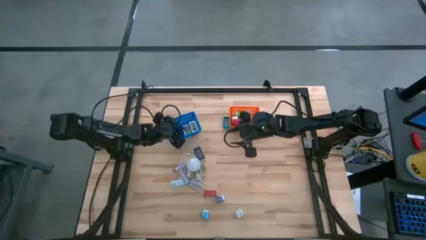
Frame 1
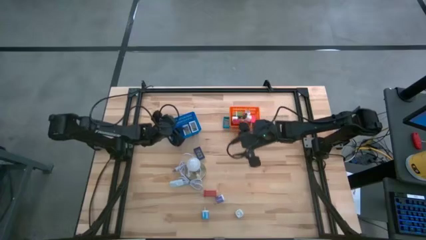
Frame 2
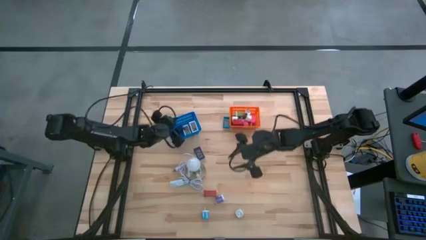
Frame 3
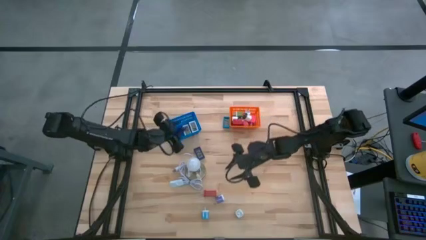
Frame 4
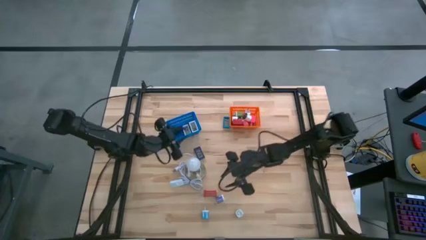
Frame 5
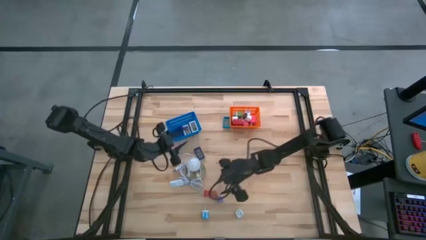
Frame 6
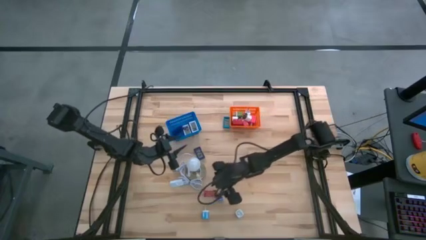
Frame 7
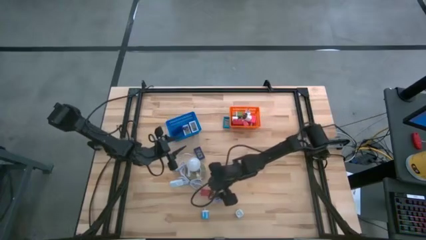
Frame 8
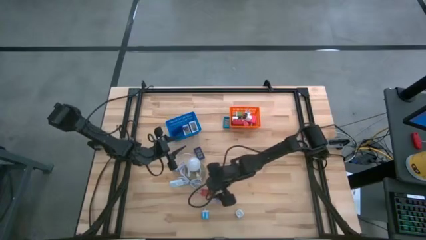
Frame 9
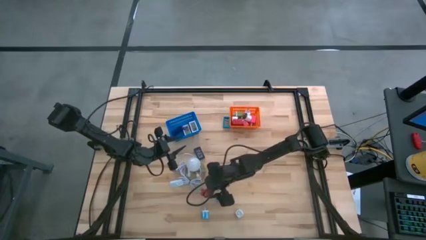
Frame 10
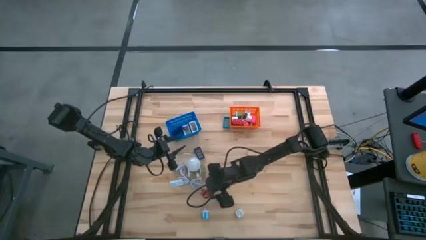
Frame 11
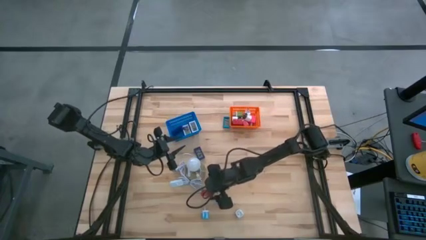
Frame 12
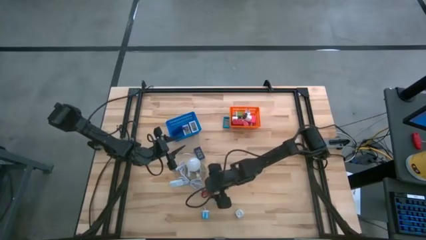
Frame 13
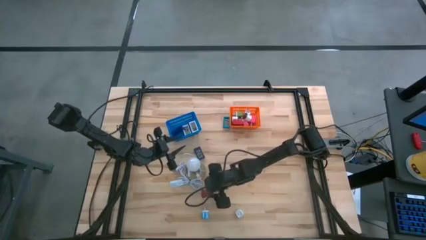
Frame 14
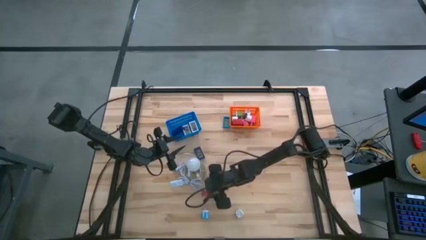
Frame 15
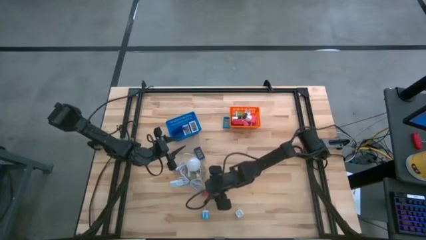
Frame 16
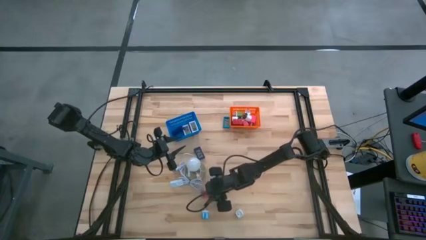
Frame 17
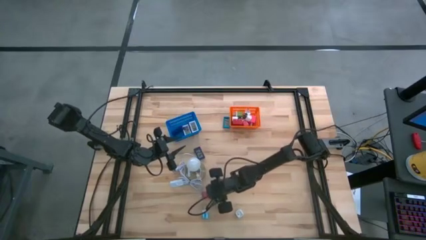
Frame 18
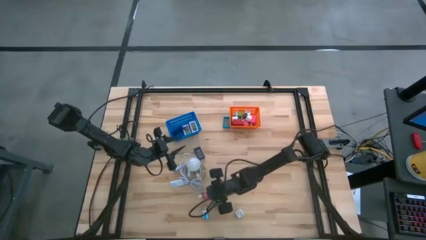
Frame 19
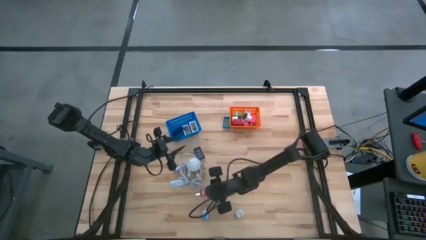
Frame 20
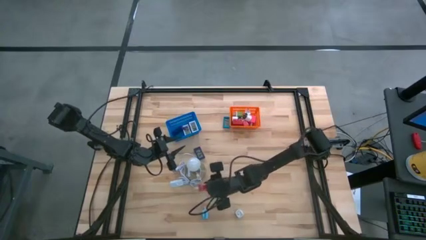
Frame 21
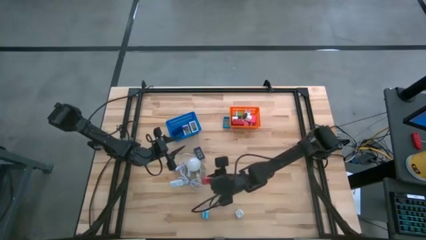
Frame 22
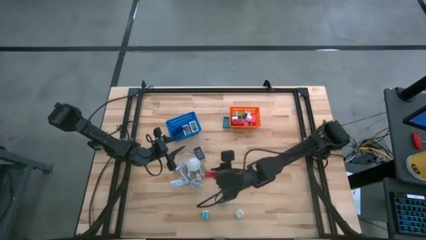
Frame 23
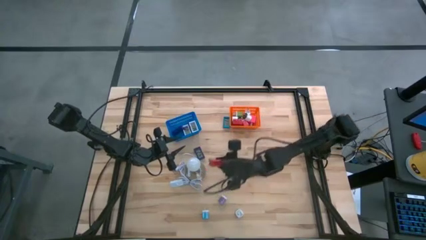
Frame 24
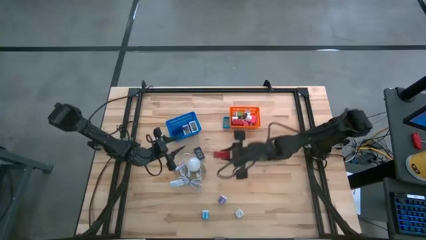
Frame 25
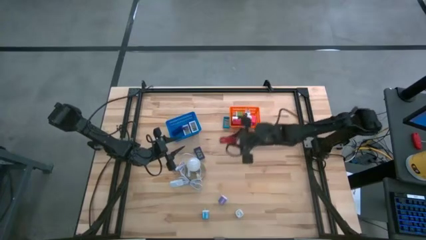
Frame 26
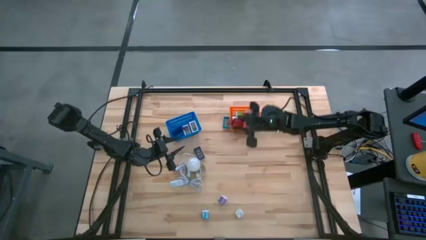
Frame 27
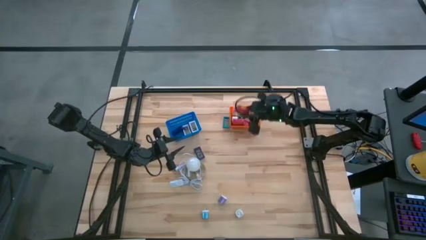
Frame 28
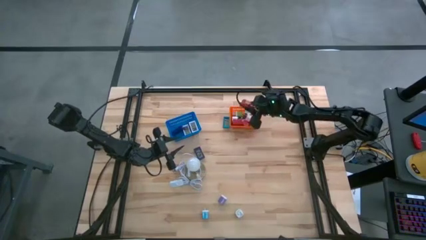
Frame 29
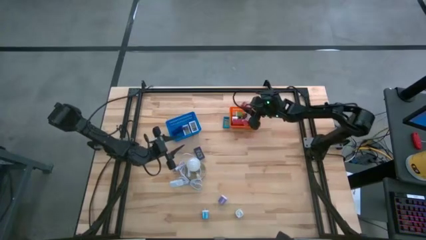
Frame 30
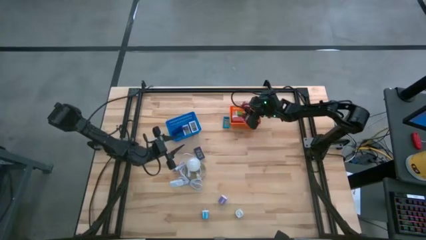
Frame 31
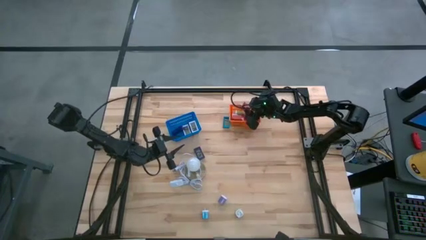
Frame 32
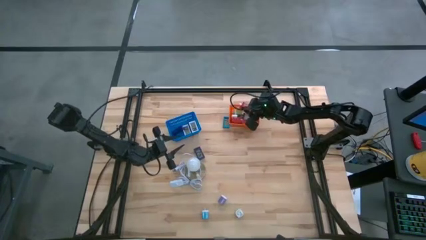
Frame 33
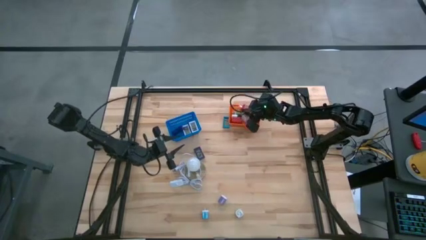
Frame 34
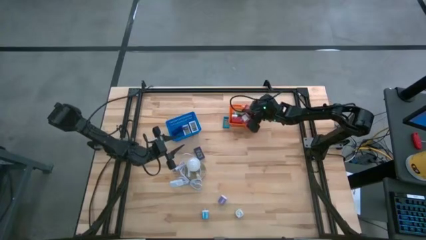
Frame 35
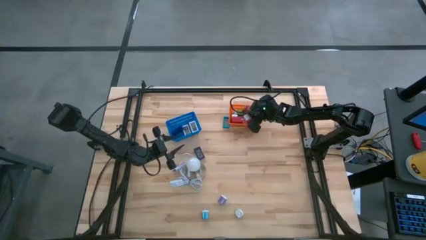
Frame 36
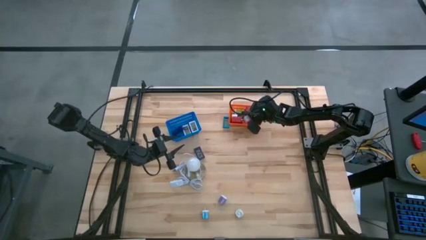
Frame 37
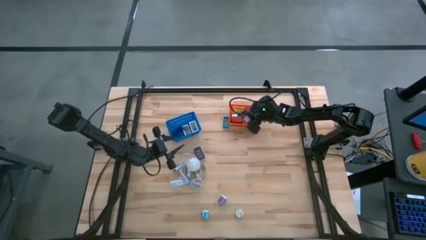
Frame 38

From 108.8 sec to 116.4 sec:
Task: Pick & Place Office items
Put the red charger adapter into the orange bin

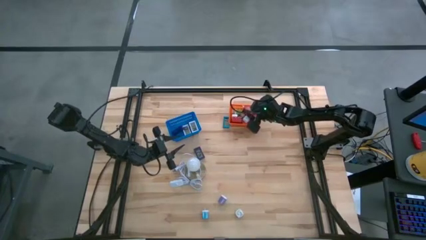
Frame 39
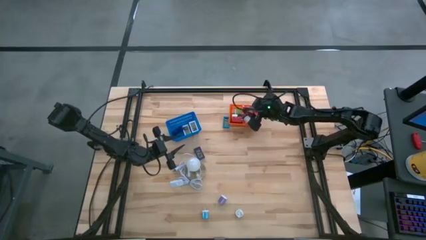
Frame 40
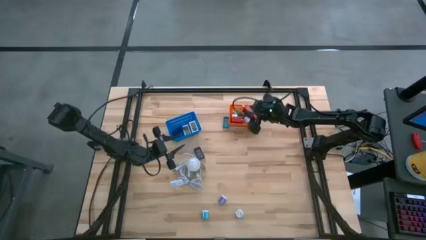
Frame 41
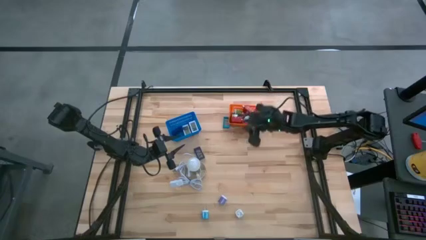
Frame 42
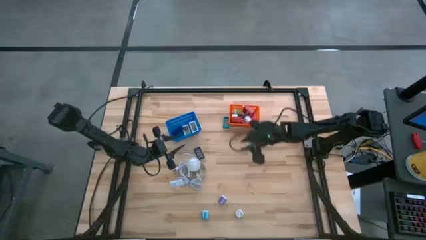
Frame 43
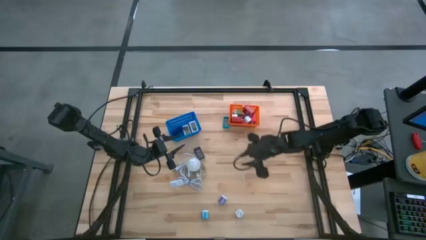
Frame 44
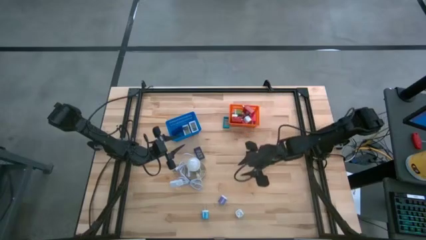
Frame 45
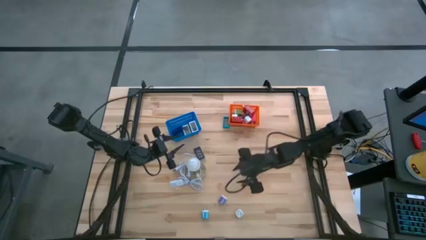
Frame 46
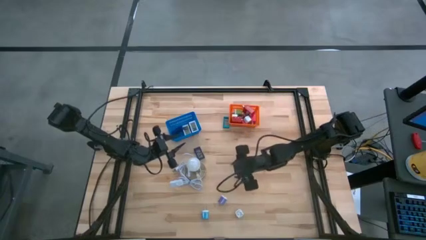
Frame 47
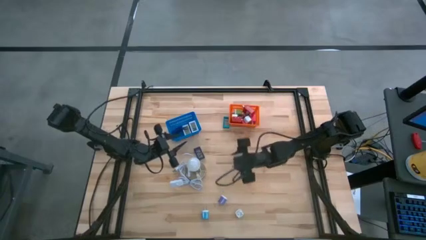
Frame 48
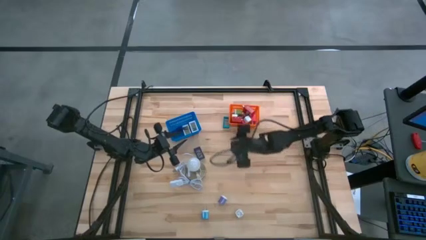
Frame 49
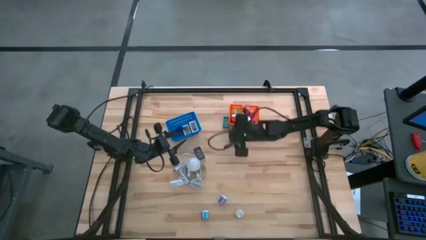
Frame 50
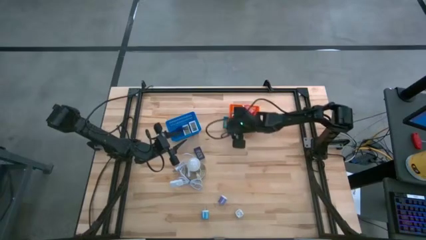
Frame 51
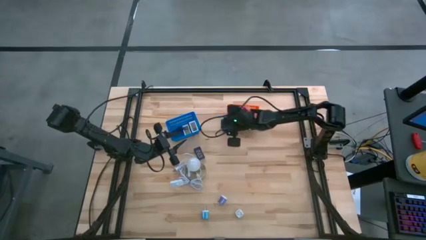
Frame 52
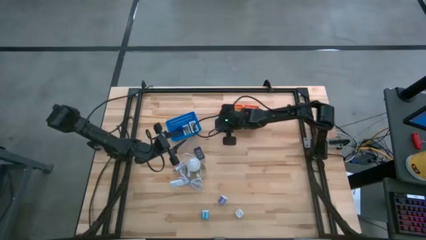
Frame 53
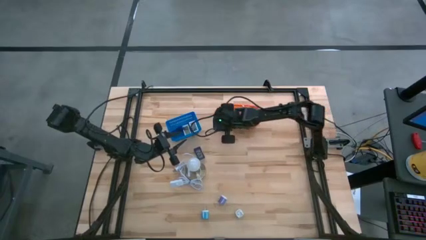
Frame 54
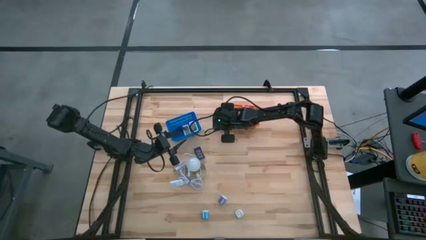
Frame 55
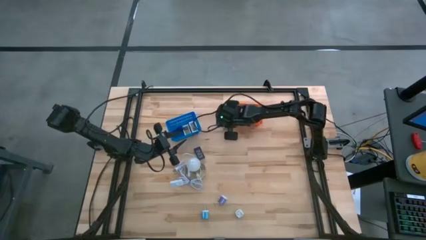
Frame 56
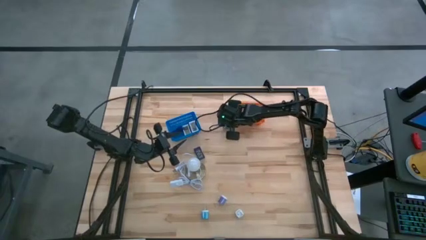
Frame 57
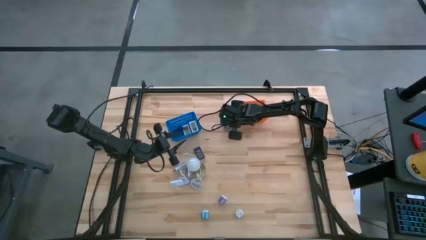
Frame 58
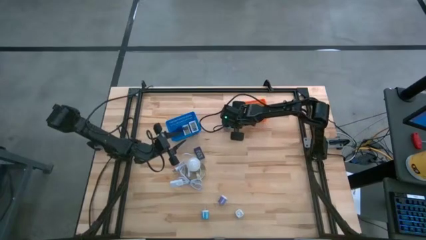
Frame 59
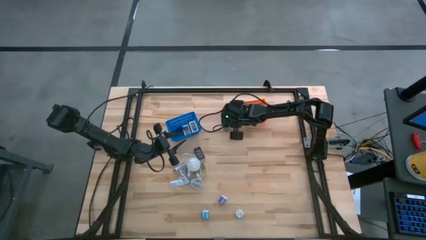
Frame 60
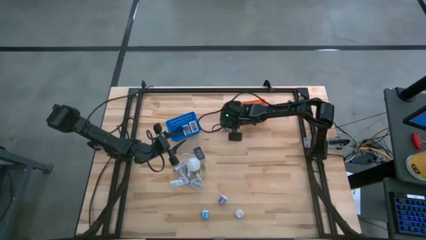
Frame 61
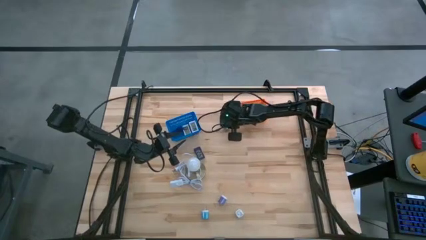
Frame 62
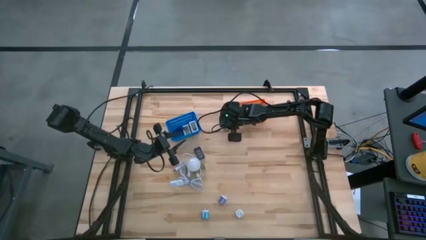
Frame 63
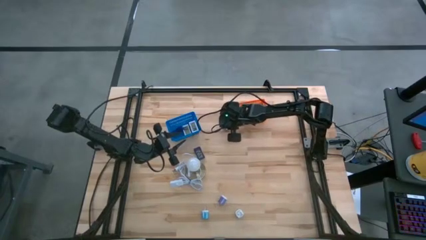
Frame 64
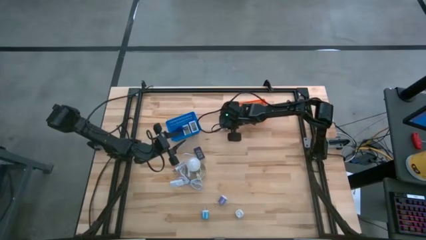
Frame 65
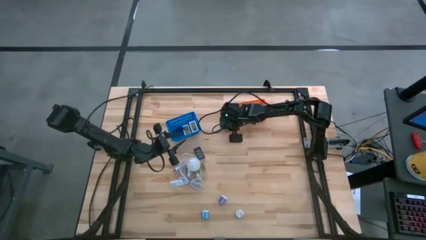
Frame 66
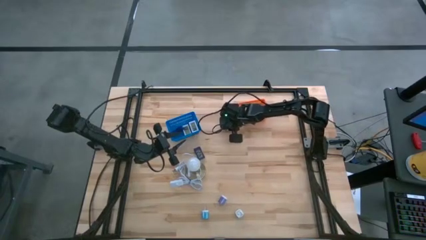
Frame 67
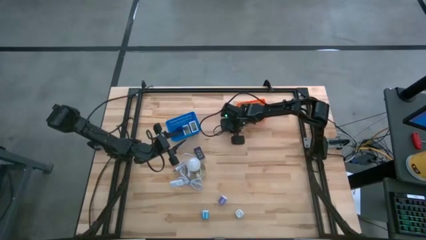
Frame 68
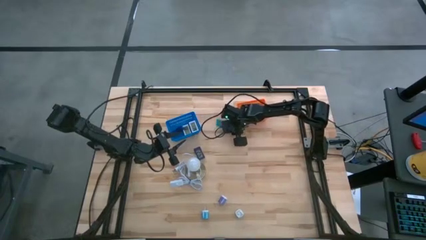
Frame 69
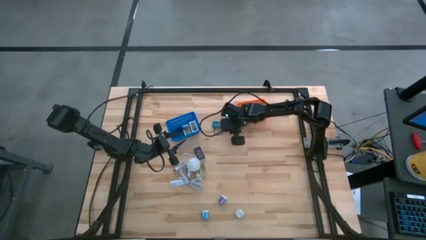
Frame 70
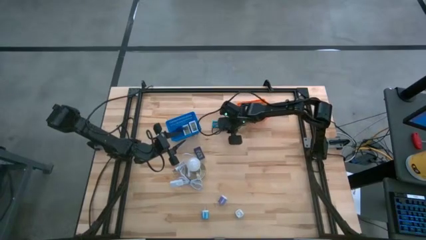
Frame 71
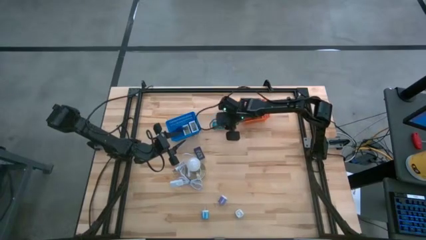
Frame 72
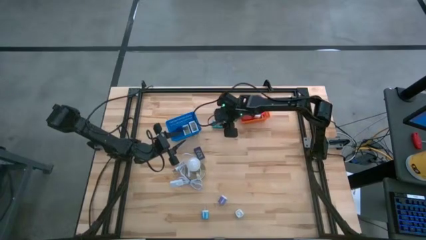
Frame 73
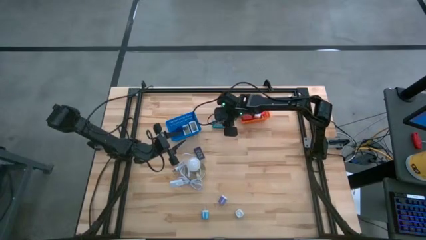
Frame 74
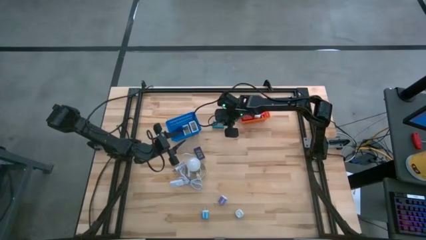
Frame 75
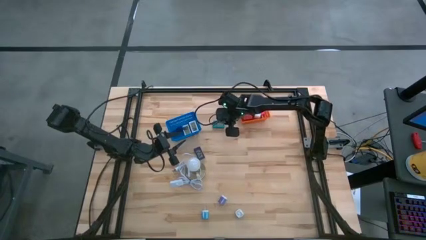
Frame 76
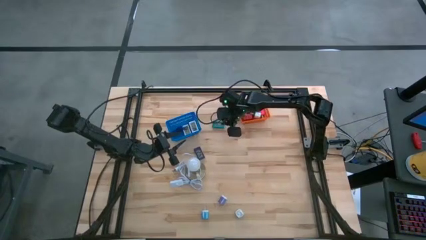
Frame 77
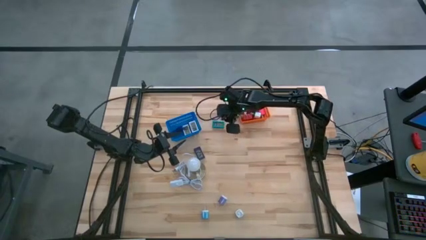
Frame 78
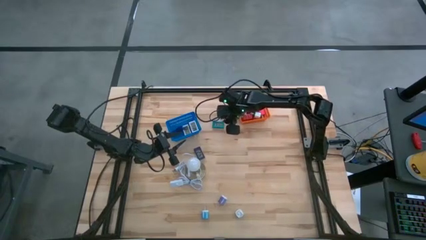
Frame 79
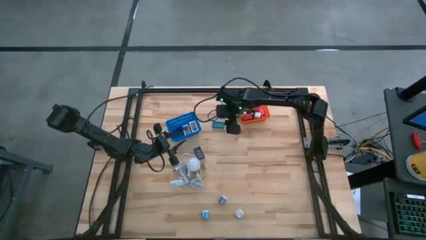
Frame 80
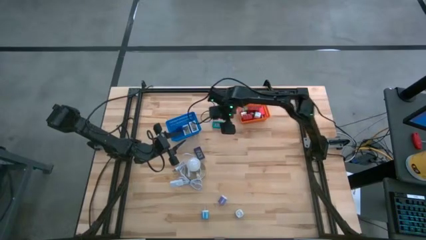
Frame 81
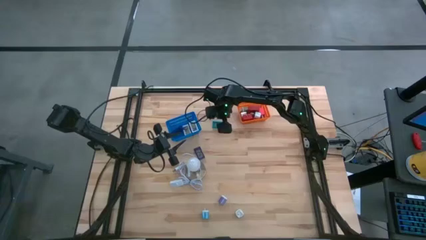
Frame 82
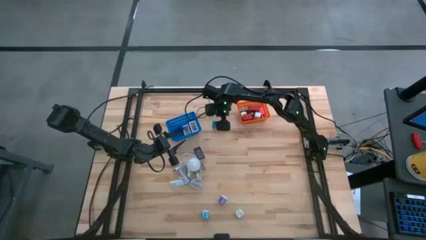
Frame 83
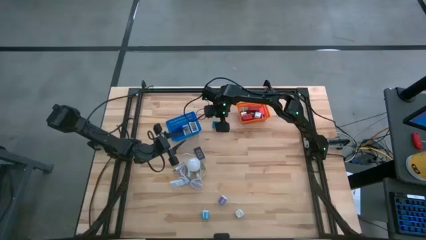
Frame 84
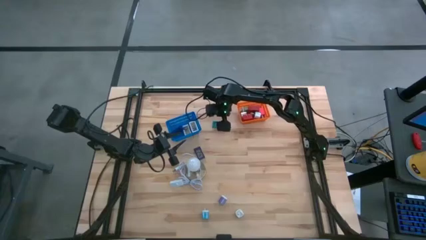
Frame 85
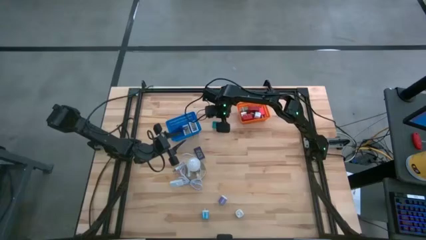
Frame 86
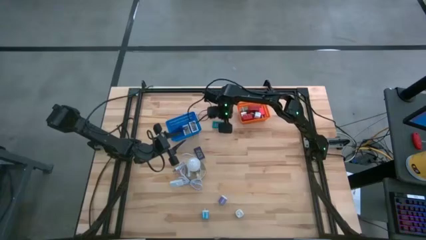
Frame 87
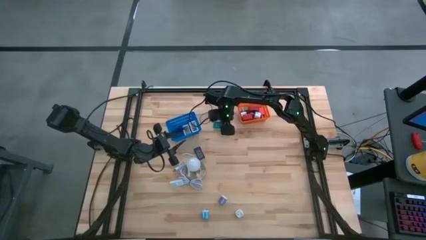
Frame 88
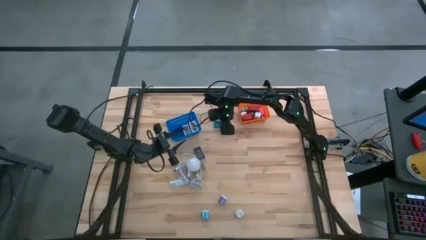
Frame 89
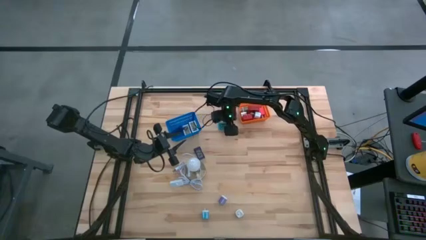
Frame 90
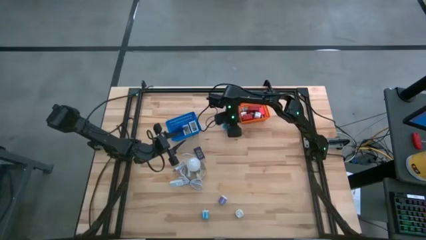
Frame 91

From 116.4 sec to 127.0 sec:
Put the light blue timer into the blue bin
